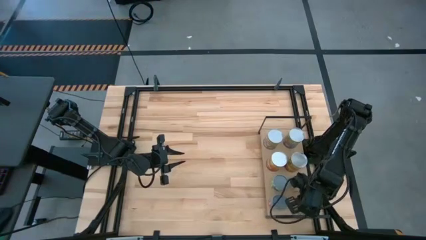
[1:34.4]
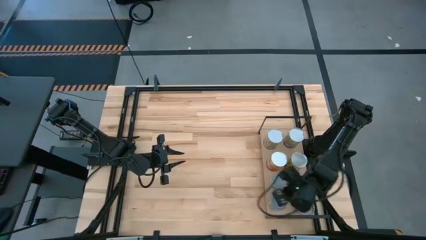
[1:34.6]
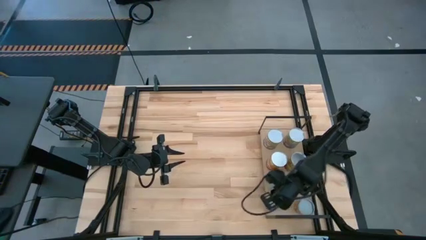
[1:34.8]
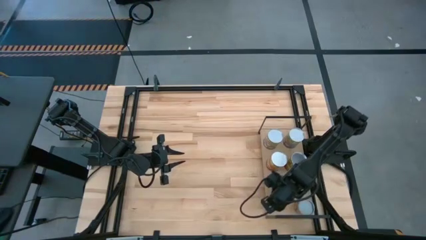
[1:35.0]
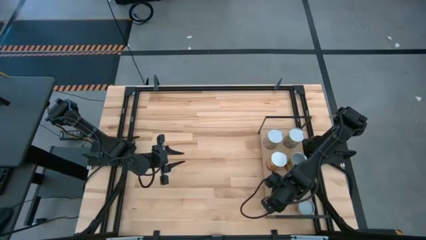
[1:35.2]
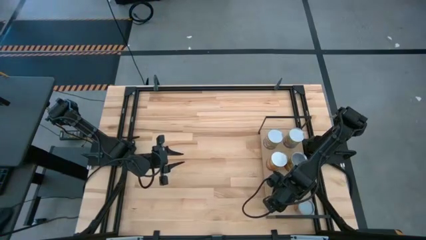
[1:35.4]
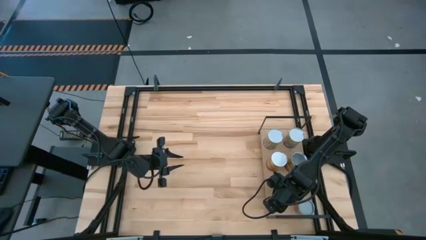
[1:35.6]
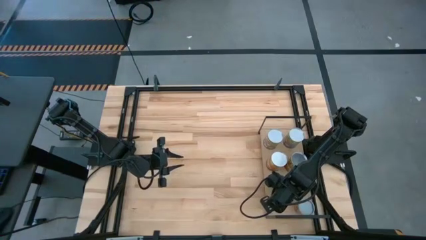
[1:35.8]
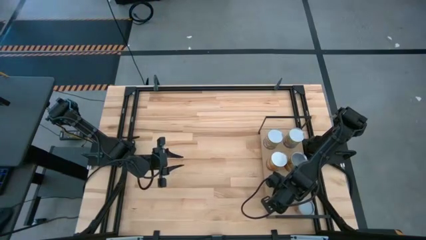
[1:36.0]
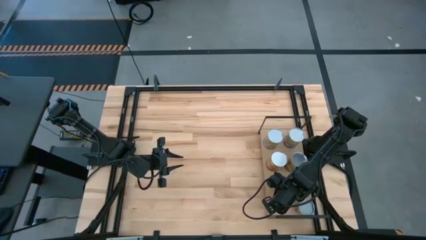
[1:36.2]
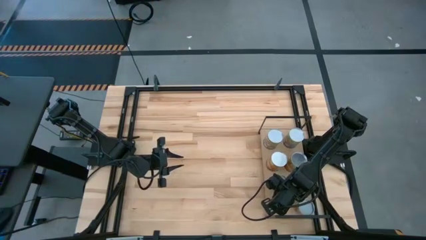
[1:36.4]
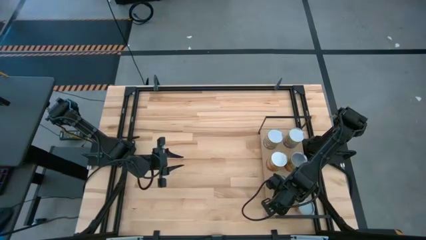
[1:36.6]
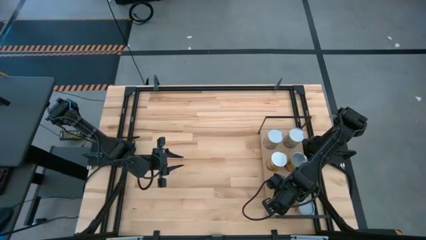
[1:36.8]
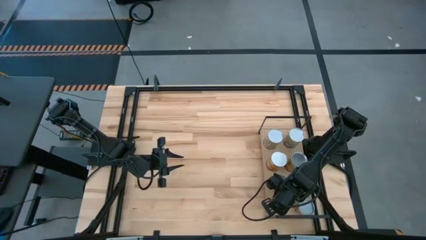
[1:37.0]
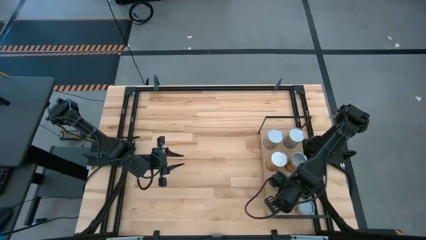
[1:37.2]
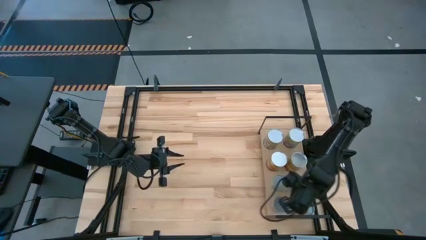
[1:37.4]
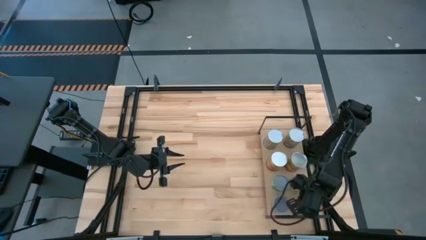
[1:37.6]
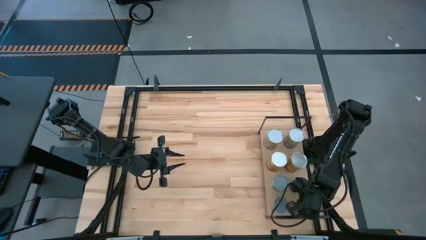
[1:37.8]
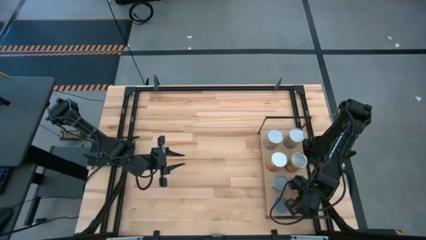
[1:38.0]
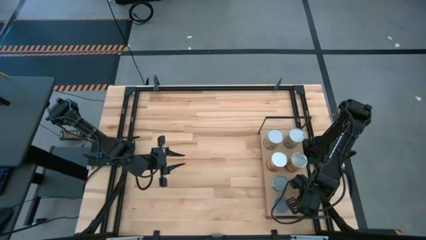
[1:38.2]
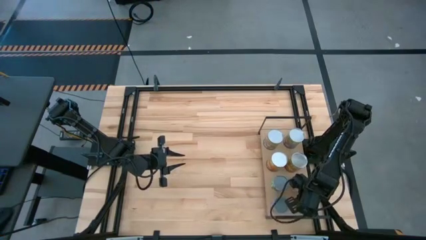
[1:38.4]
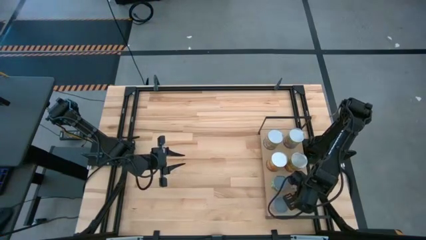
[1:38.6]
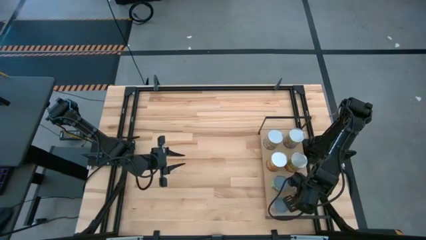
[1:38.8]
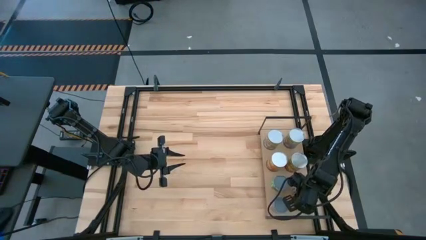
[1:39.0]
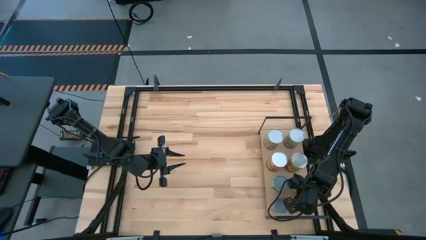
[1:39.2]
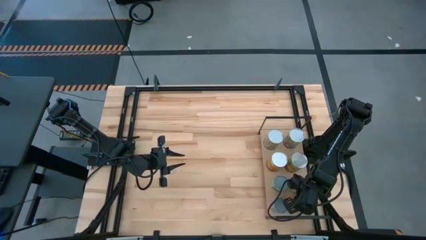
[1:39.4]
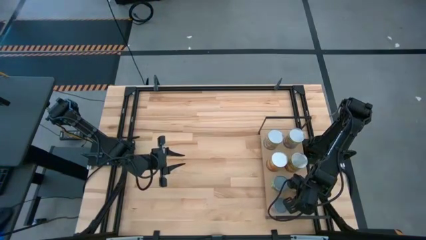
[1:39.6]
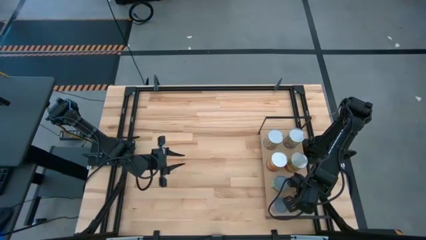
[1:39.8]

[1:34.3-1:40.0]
Task: Pick and place cans onto a shelf
Adjust the canned goods

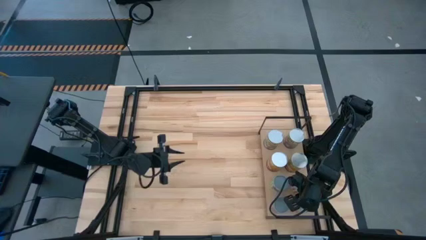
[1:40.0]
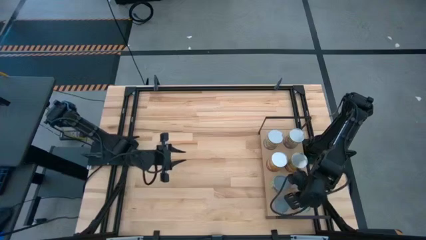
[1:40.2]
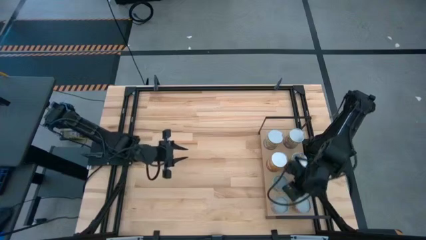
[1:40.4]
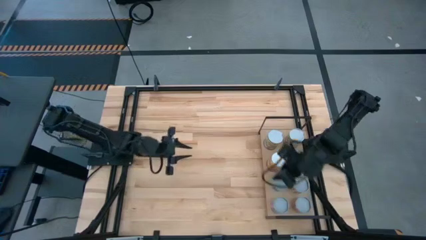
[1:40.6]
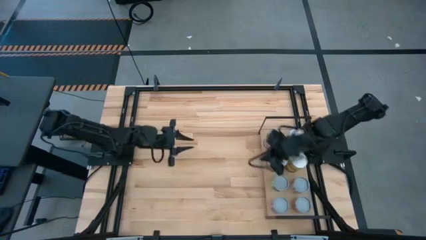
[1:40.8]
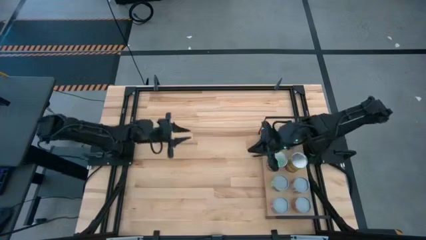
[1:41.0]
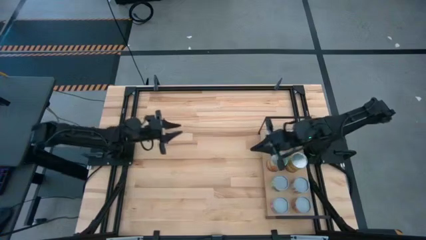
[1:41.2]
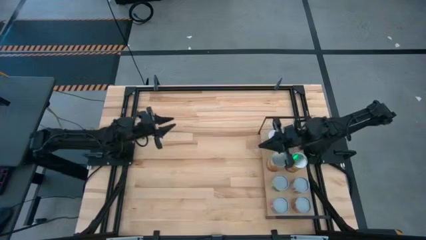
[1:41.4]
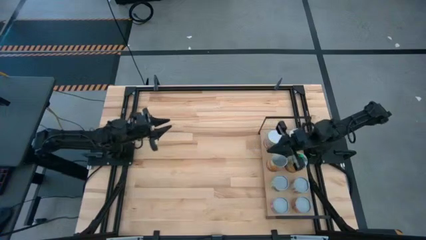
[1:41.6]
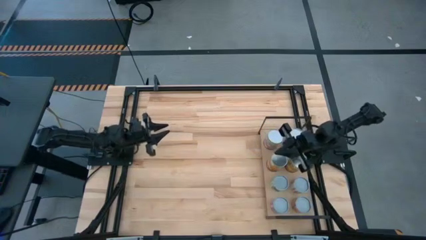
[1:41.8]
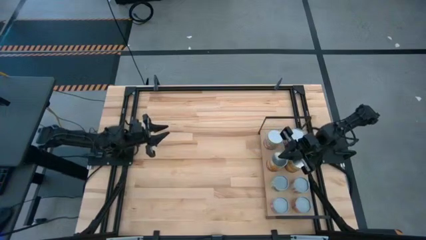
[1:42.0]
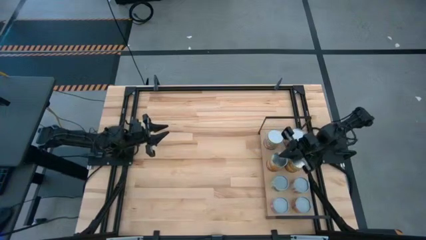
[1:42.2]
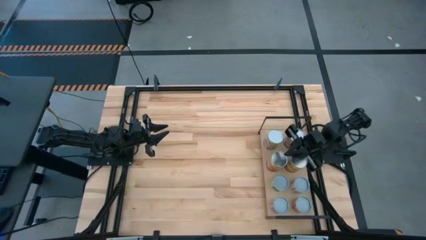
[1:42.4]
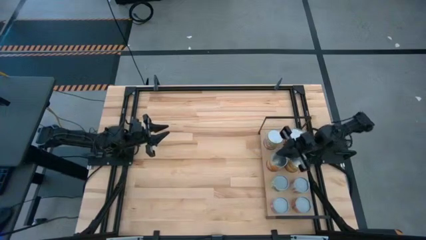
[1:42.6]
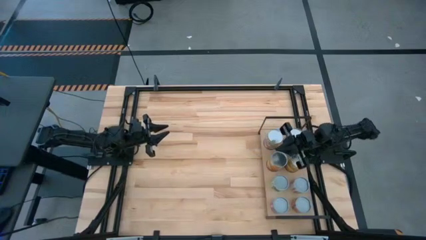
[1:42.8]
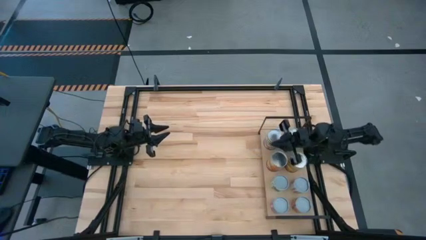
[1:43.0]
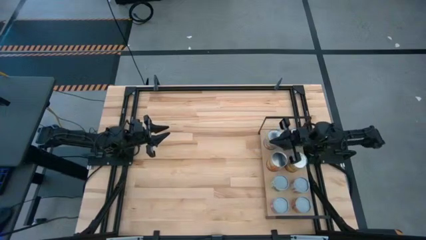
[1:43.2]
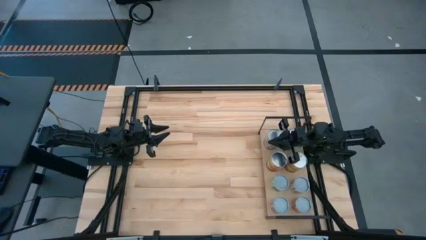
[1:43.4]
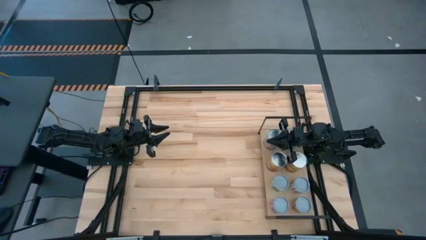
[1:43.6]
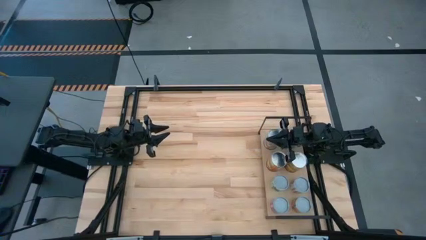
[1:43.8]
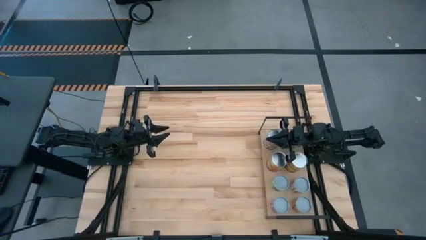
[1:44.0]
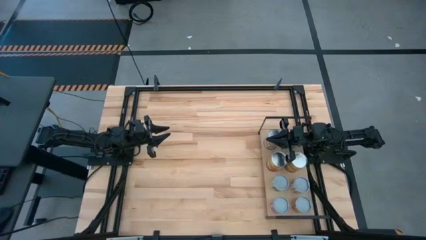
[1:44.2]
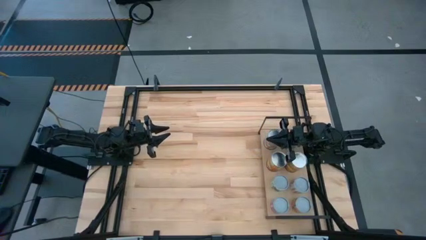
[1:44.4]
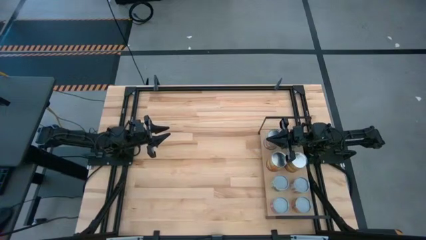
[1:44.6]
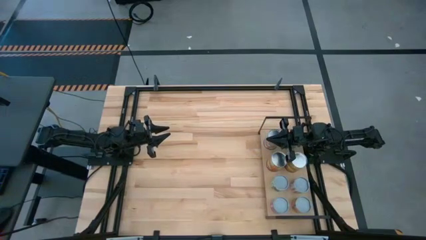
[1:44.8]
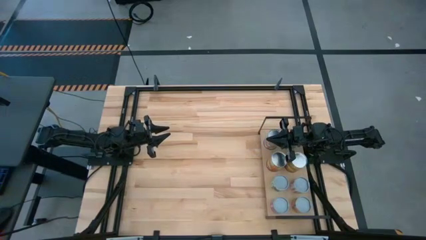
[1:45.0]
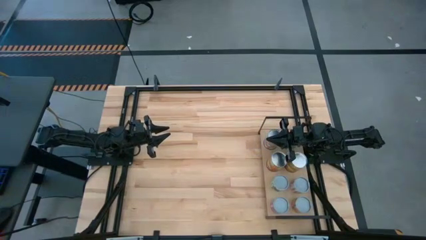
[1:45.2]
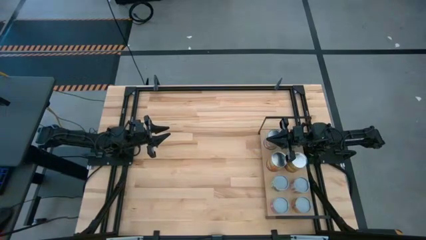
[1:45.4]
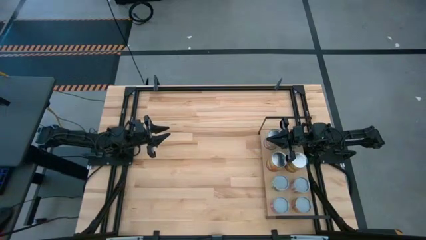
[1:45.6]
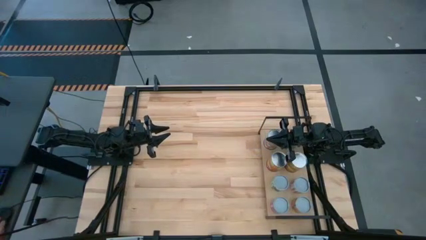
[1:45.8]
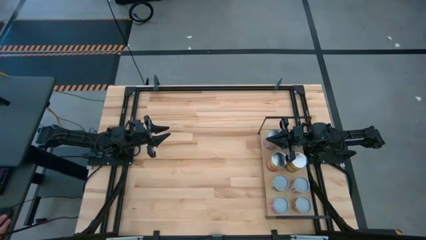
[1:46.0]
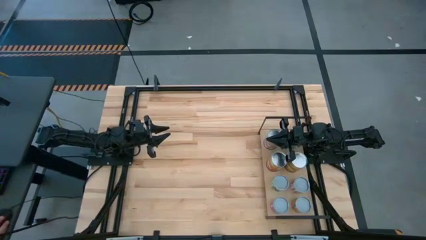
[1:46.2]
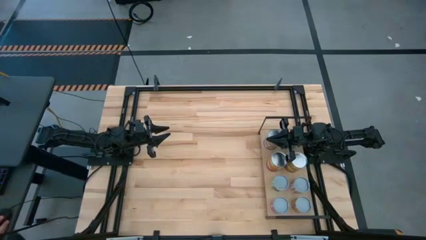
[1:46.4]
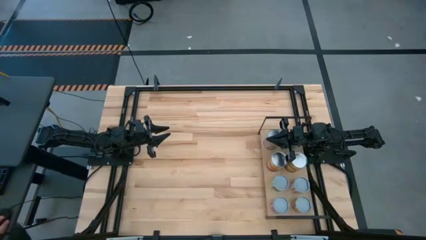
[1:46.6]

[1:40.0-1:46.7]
Return to Home Position

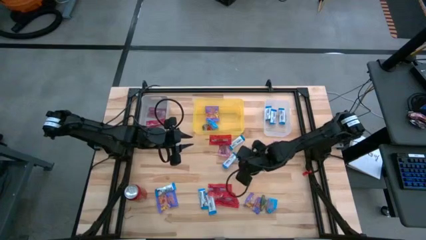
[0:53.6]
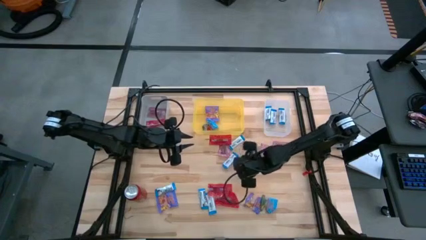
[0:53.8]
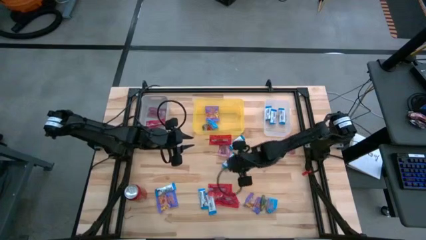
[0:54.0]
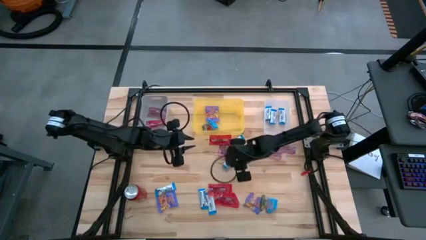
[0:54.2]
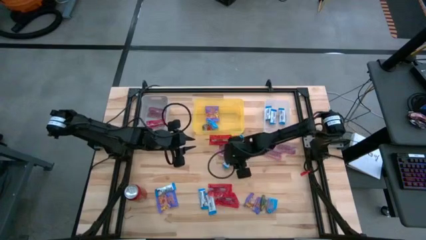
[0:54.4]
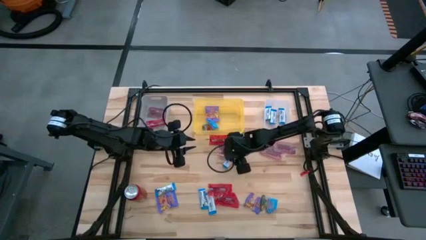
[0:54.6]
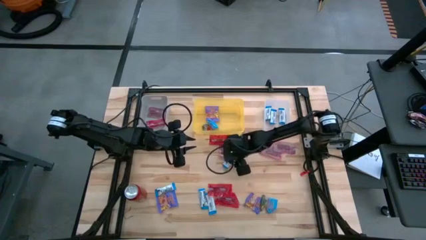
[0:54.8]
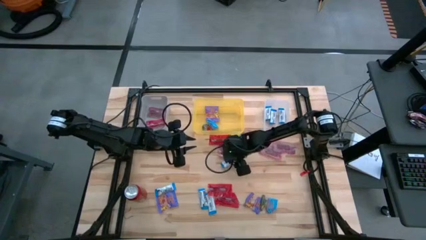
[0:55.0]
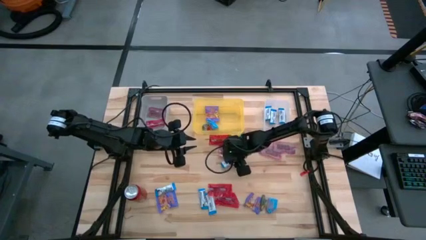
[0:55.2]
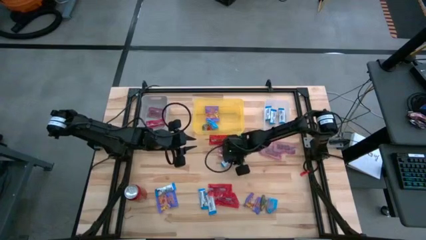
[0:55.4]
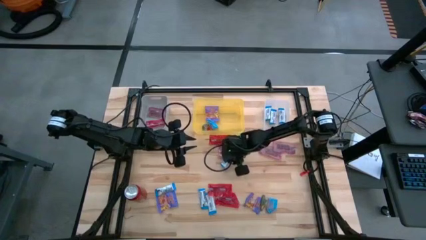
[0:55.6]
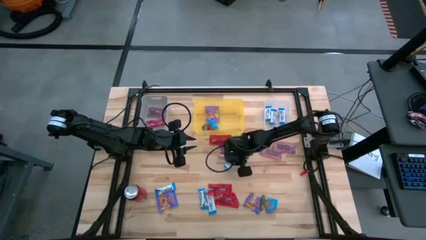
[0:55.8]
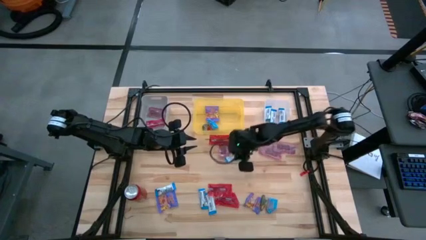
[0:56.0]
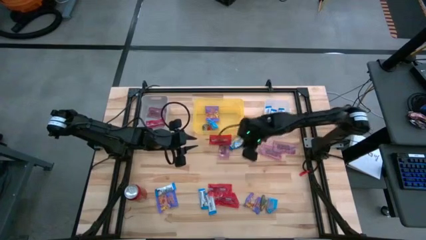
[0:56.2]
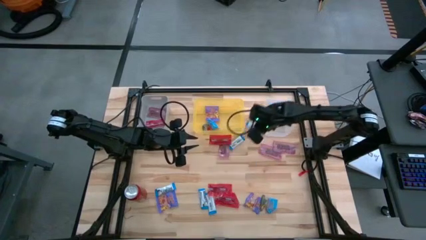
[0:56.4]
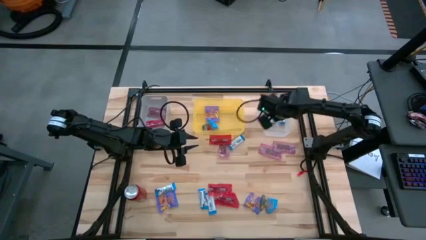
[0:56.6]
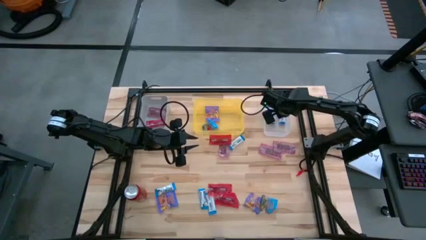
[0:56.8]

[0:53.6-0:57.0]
Task: Sort candy
Put the white chocolate into the transparent bin
